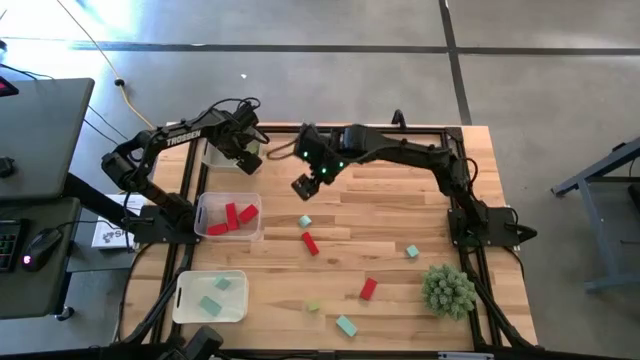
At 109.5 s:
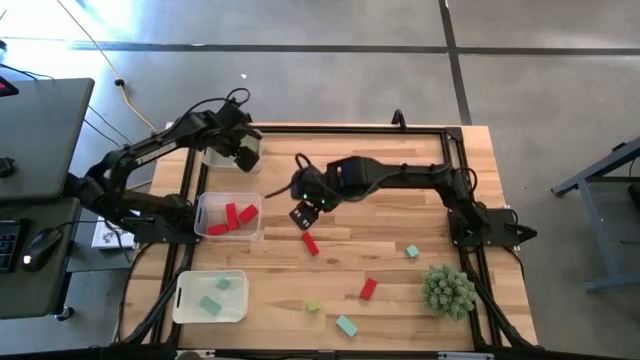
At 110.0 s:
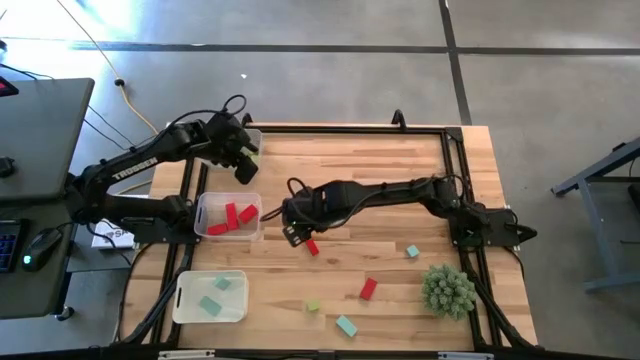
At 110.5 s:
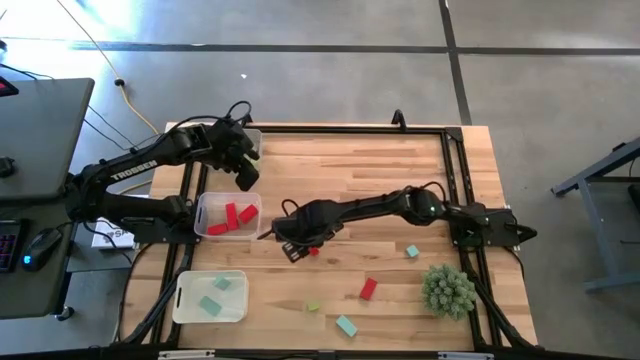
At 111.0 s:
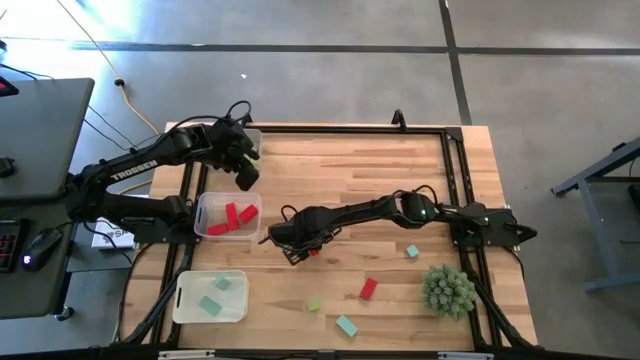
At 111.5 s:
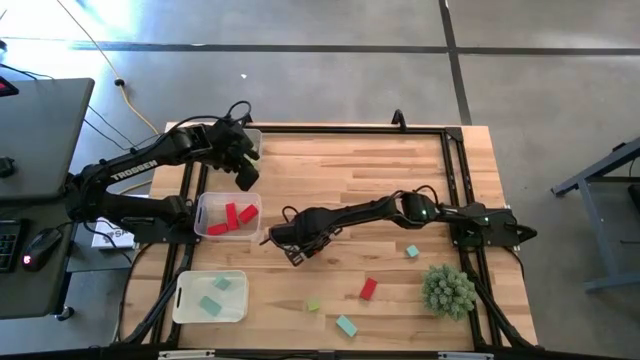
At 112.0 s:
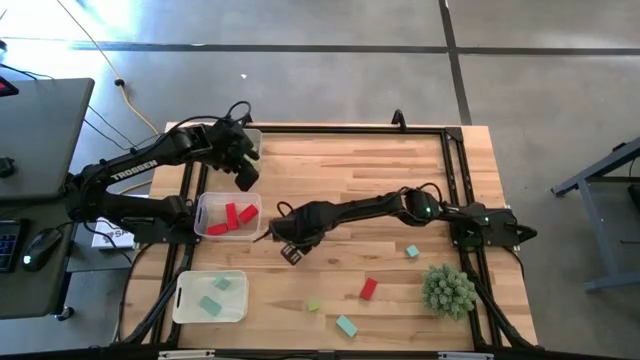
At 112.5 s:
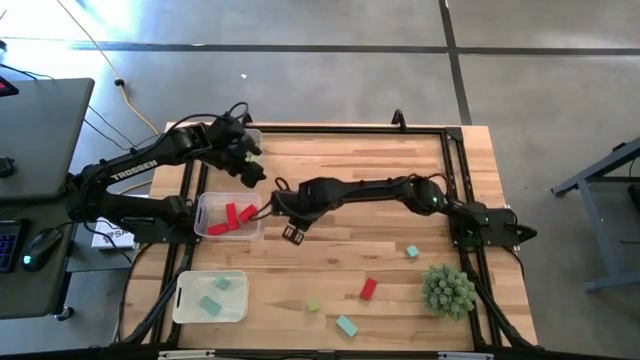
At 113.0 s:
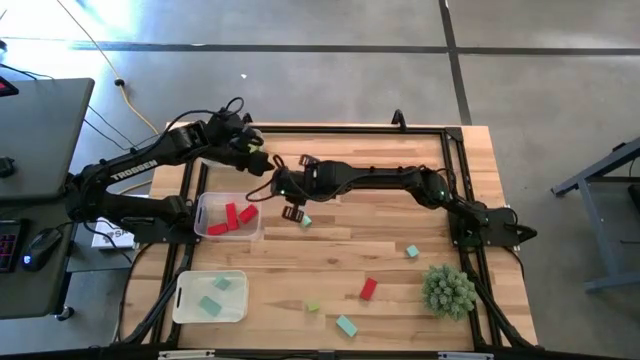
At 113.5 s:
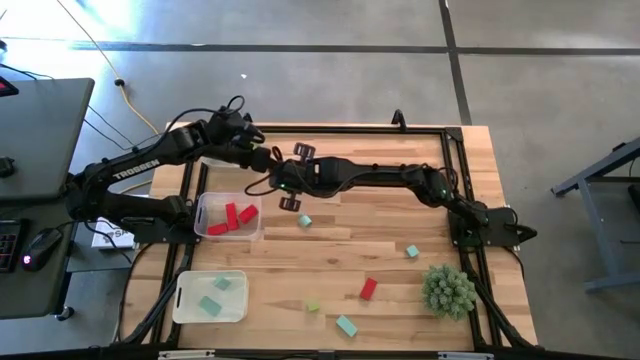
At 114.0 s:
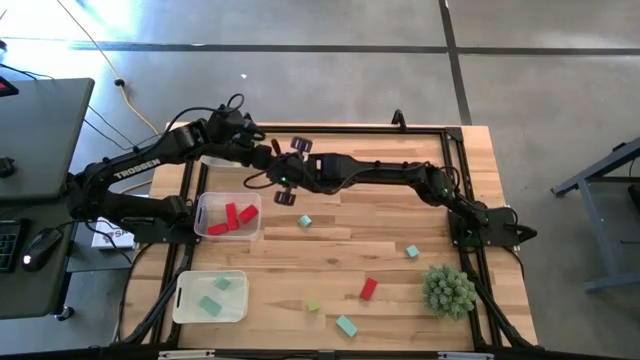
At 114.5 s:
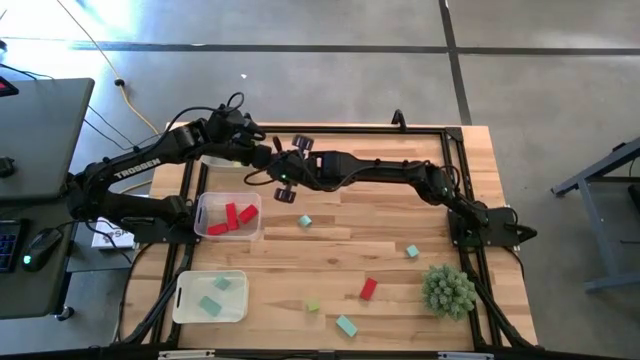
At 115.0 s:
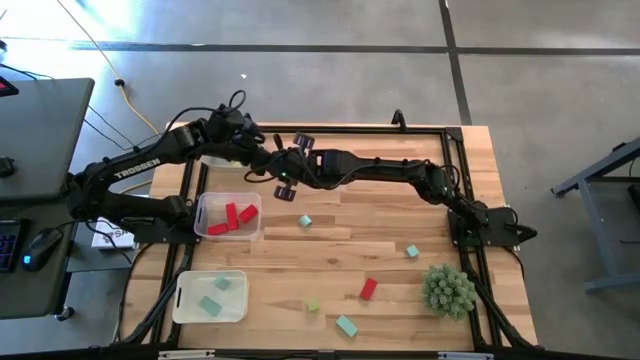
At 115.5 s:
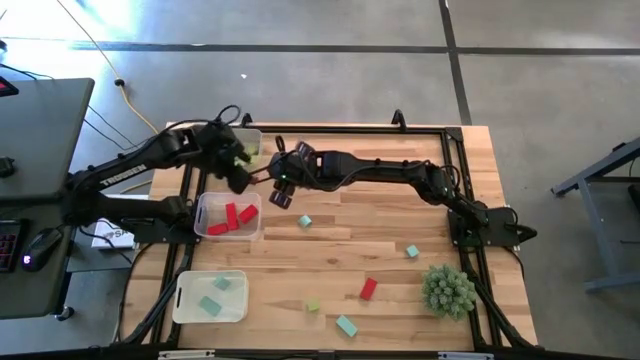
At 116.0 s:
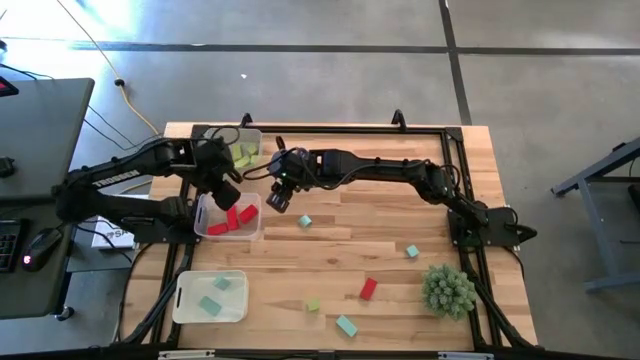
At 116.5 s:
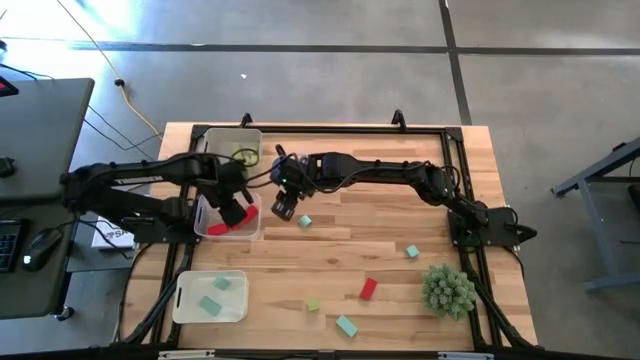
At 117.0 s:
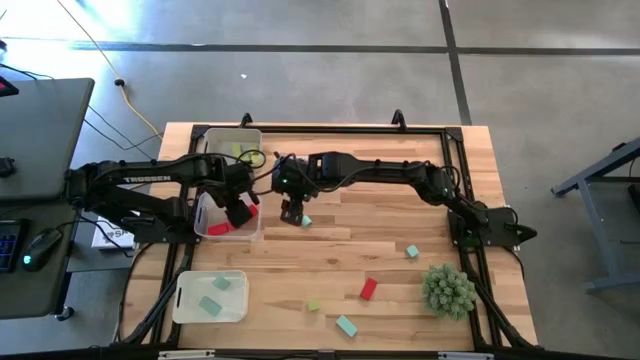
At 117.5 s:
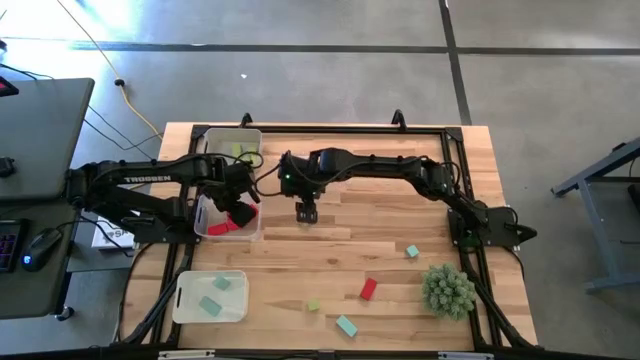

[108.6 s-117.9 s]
Task: Sort & place blocks by color
Put the block into the transparent bin

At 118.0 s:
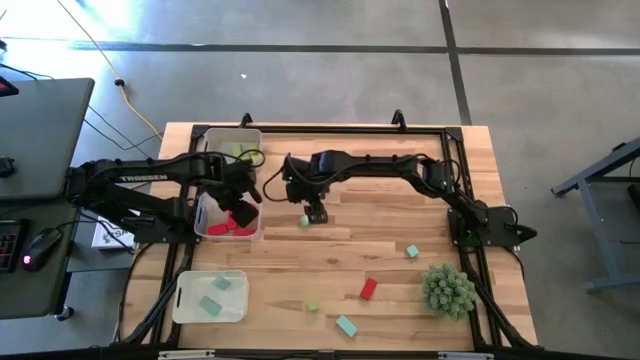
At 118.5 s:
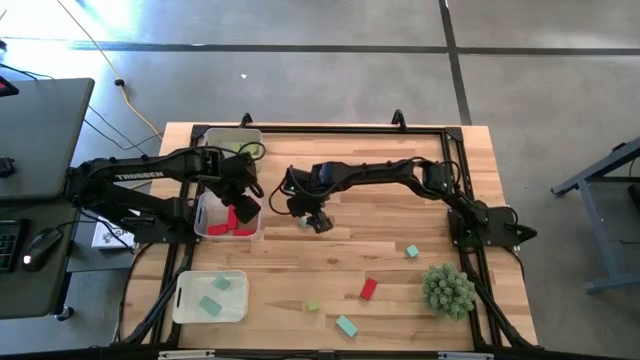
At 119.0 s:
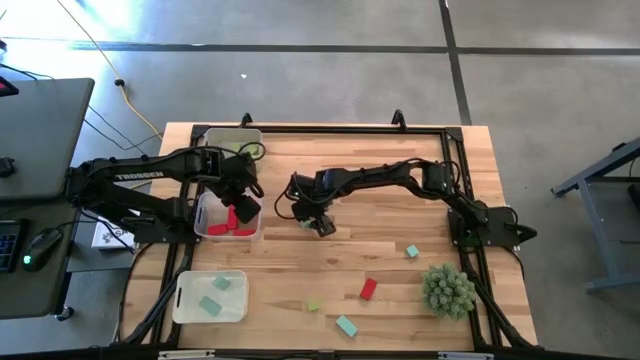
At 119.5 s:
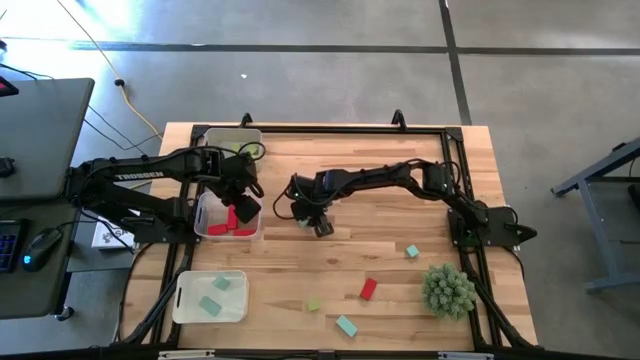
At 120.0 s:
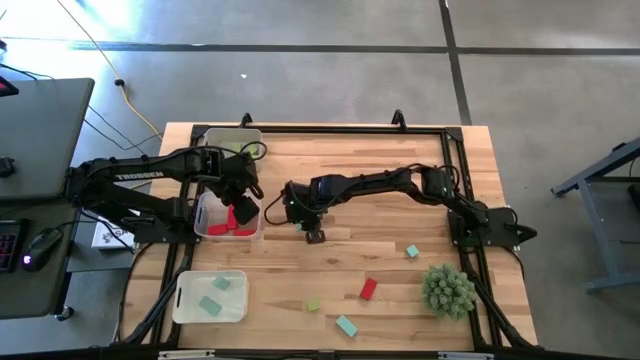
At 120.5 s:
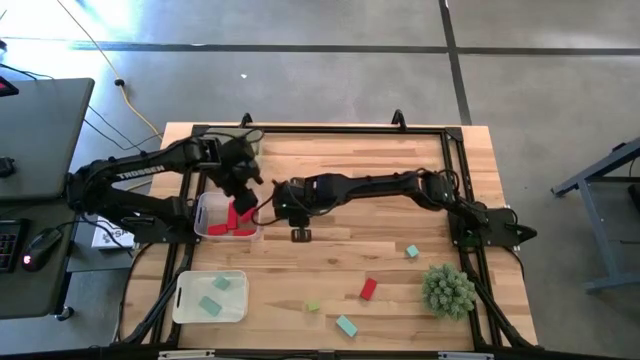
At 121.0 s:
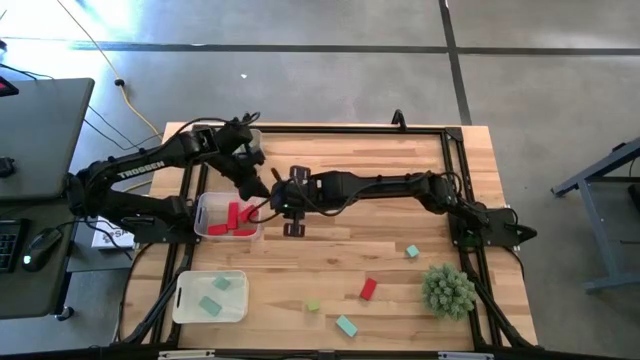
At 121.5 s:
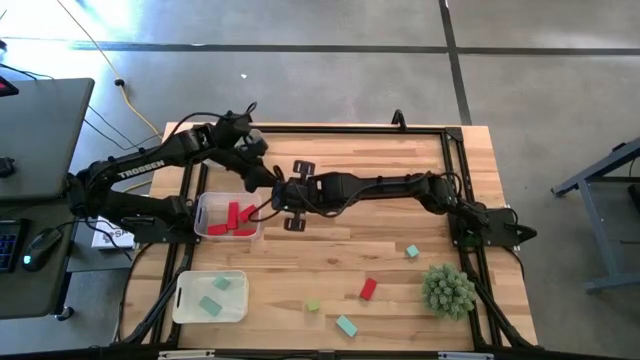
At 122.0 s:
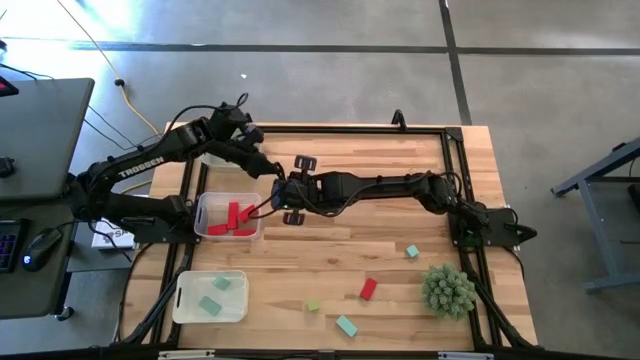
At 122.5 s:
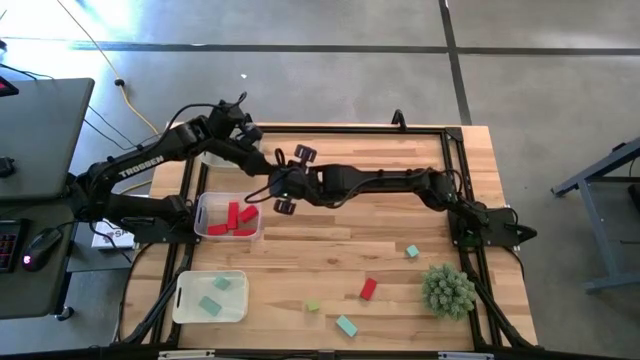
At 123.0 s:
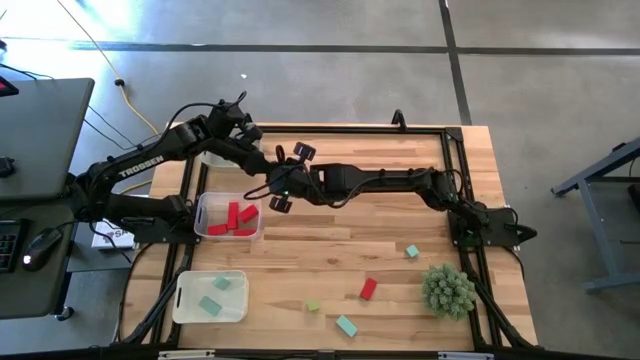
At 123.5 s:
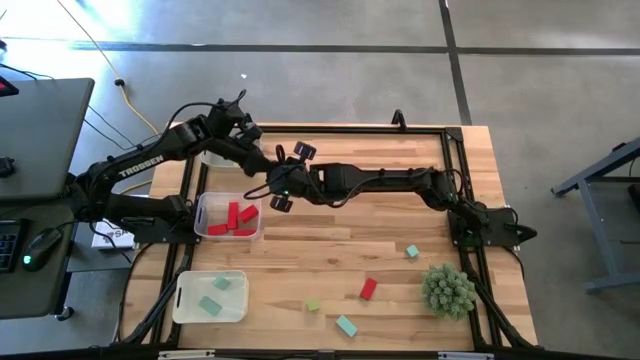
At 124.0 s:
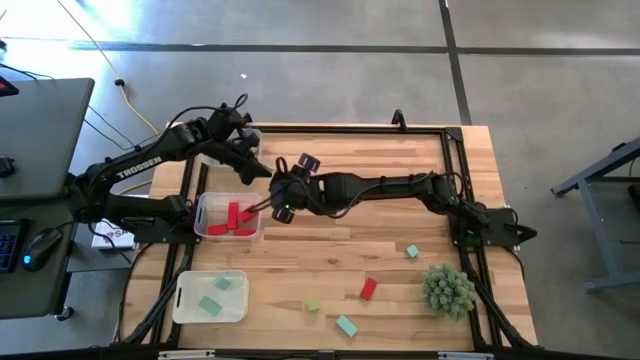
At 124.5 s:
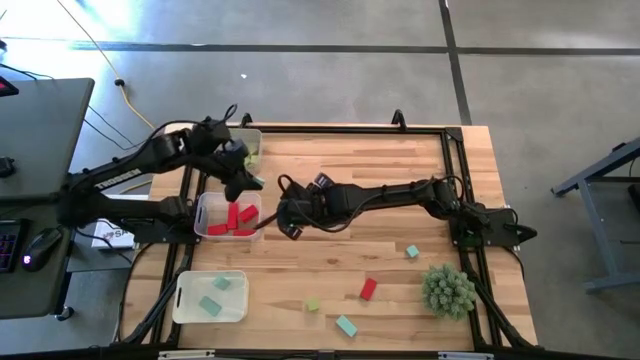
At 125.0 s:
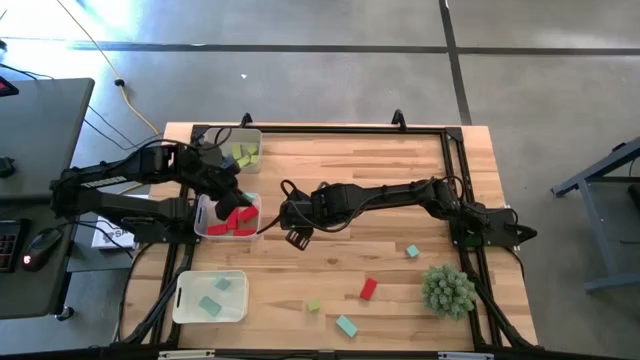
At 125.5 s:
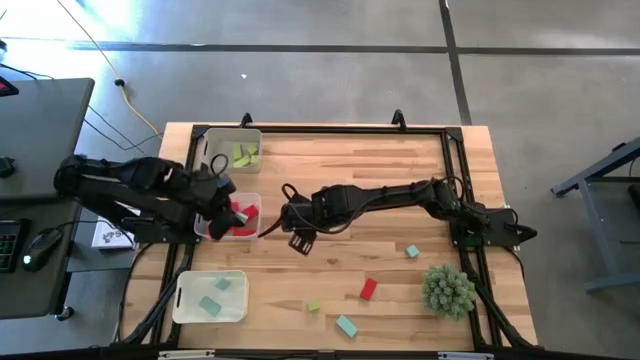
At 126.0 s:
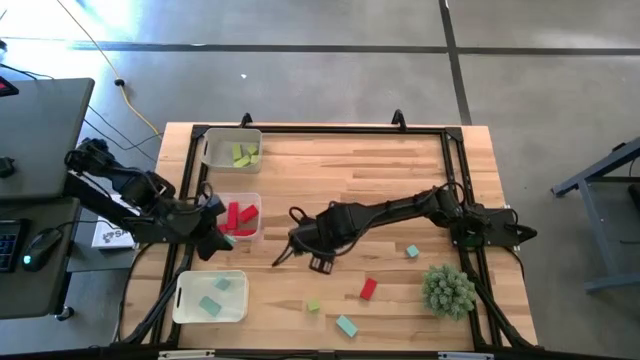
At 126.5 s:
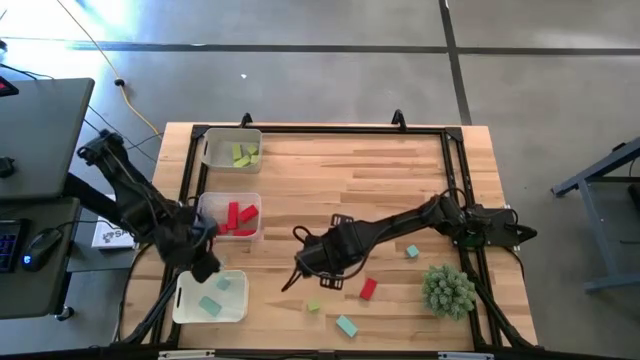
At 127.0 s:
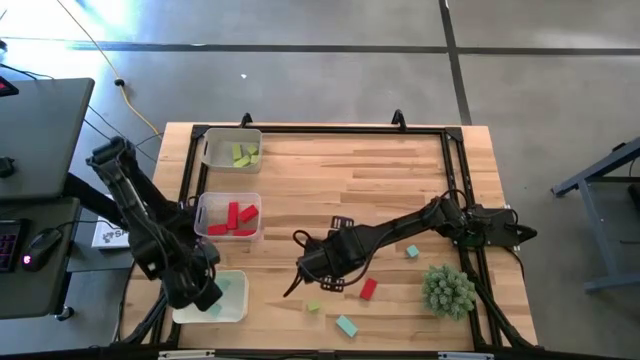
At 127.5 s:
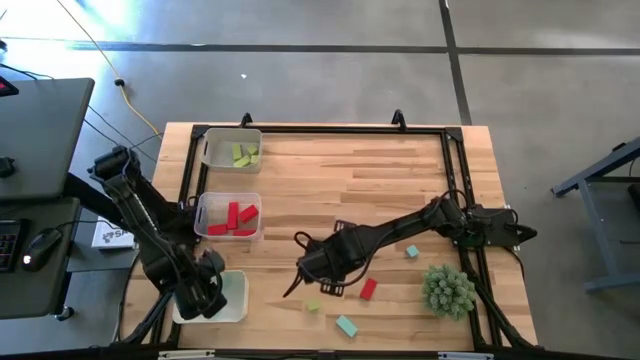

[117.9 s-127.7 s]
Put the light blue block into the white bin

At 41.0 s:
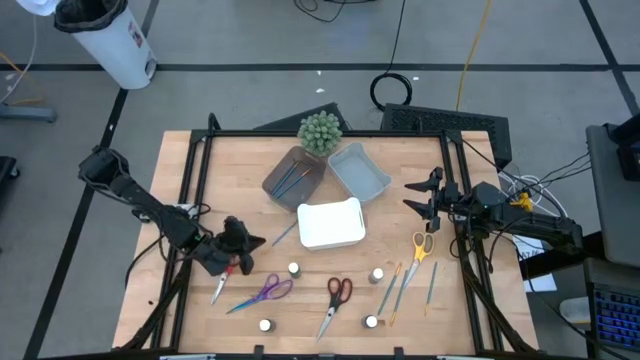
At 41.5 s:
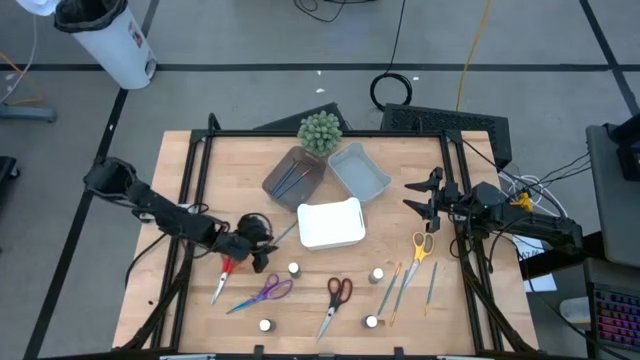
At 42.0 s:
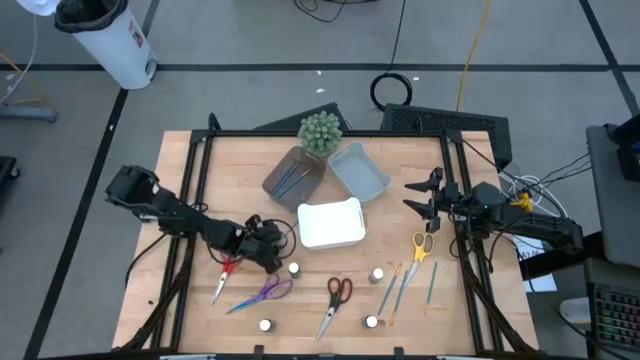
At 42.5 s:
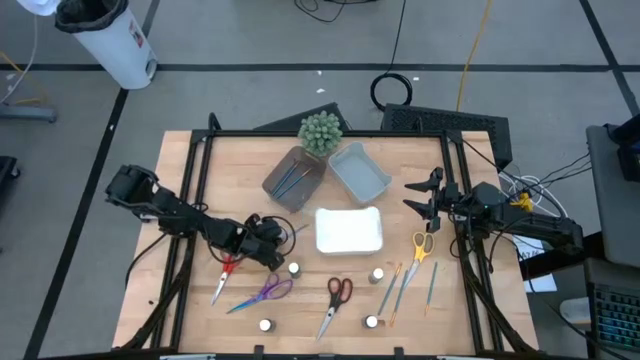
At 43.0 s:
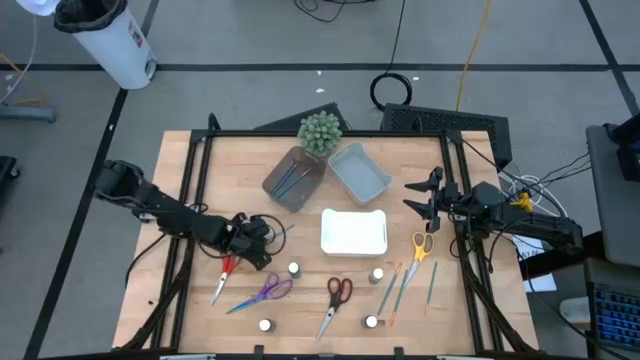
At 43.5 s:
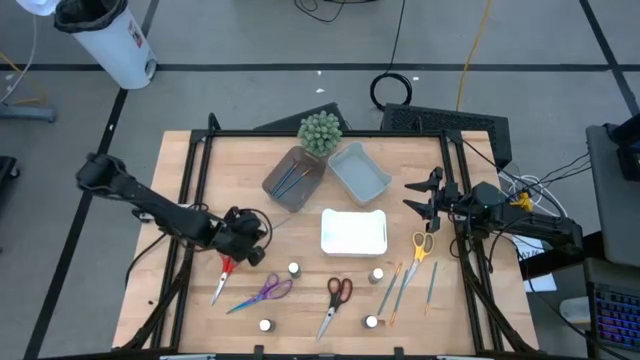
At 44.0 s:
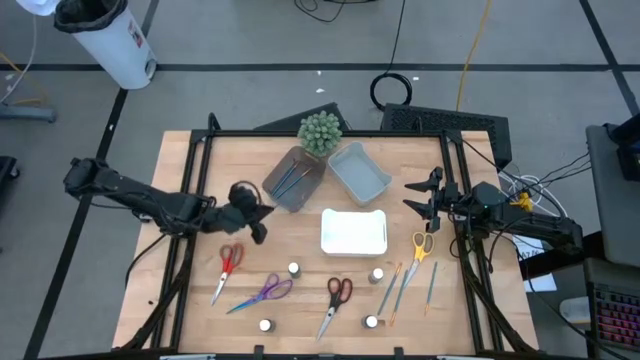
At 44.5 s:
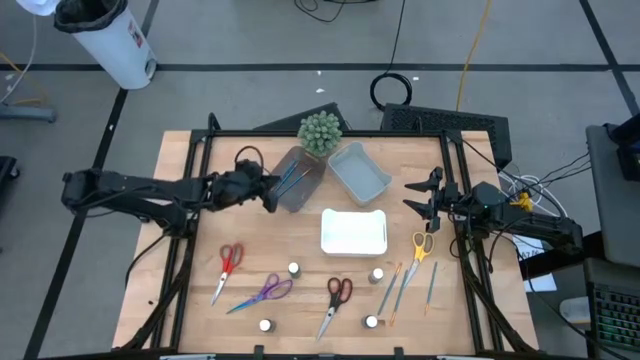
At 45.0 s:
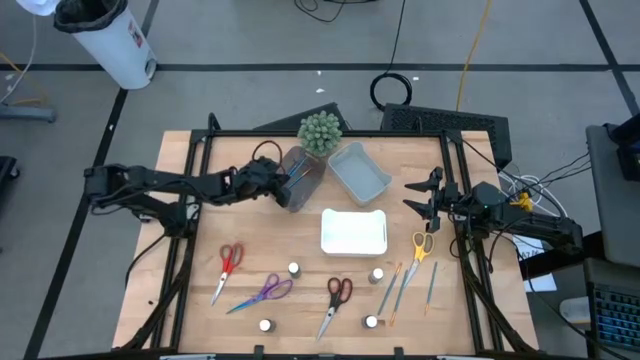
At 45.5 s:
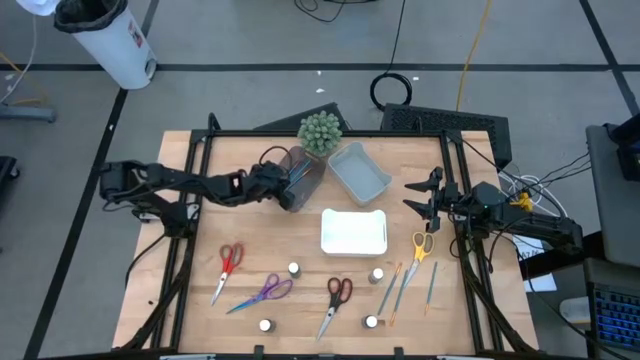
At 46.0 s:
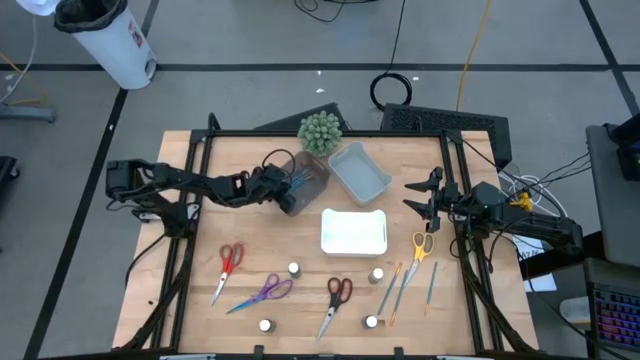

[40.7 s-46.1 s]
Task: Pick & Place Paint Supplies
Put the blue paint brush into the black bin
